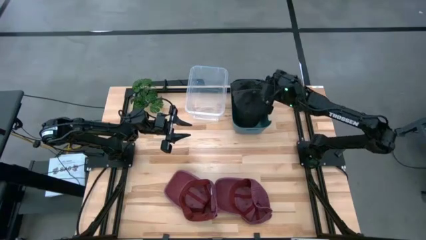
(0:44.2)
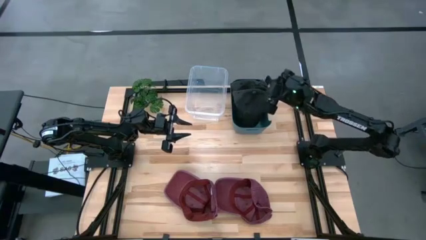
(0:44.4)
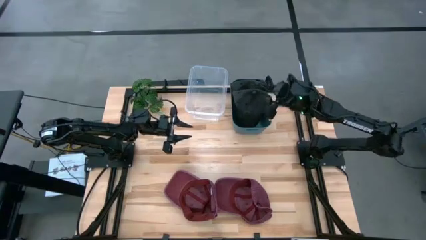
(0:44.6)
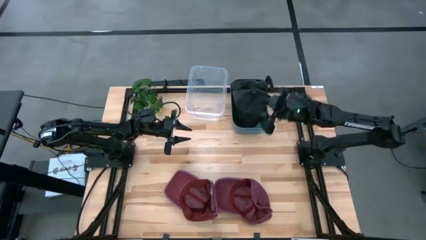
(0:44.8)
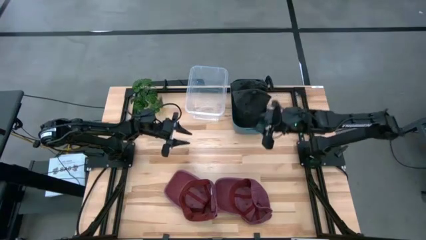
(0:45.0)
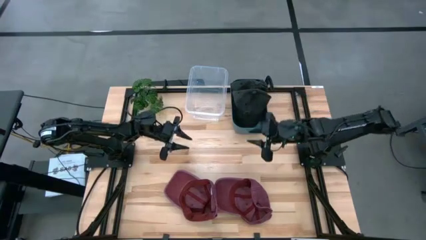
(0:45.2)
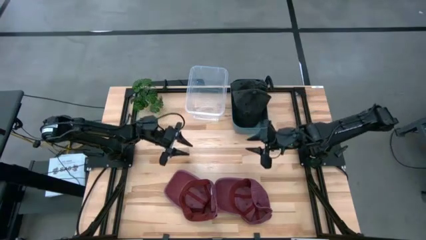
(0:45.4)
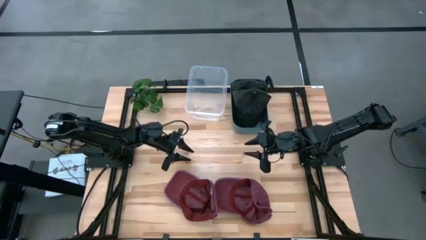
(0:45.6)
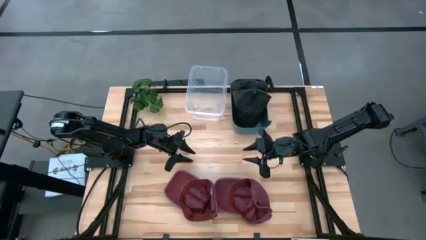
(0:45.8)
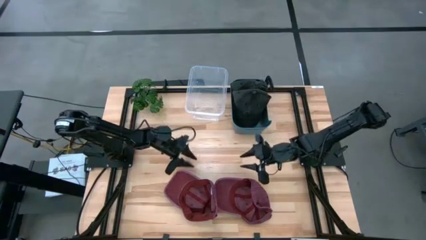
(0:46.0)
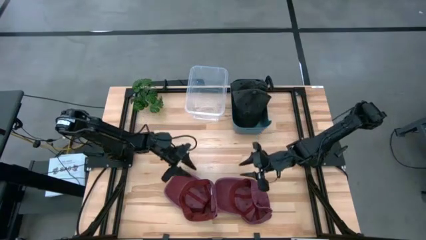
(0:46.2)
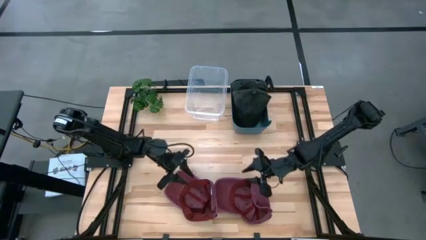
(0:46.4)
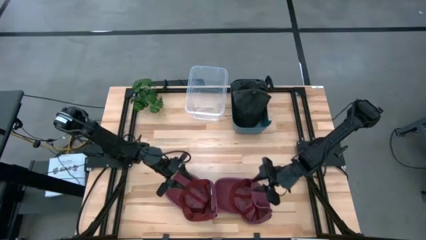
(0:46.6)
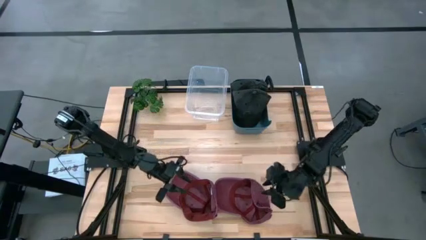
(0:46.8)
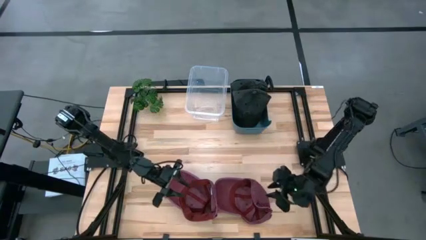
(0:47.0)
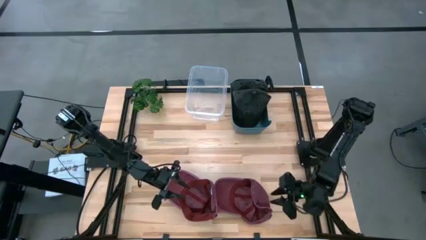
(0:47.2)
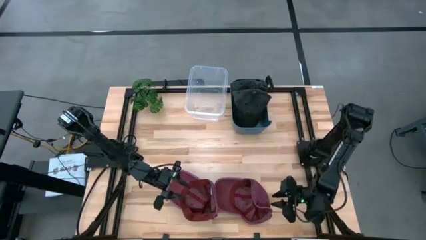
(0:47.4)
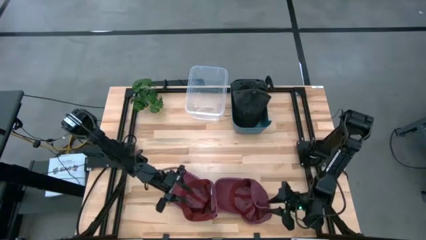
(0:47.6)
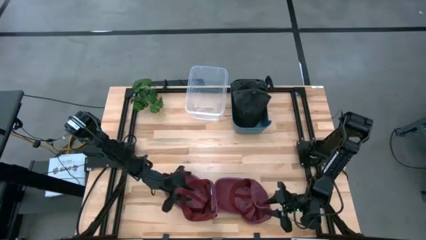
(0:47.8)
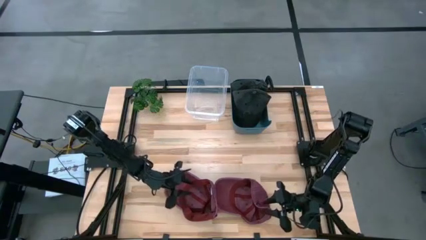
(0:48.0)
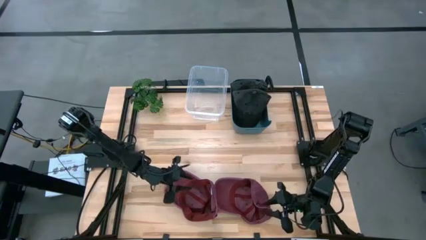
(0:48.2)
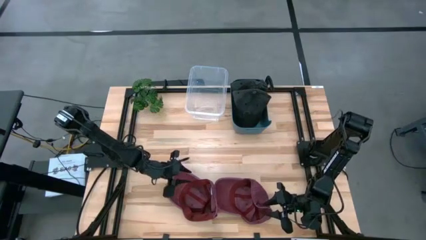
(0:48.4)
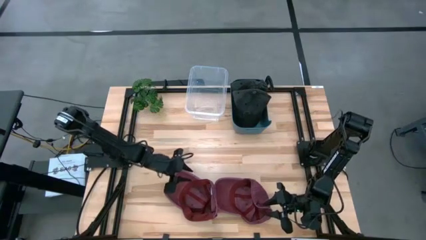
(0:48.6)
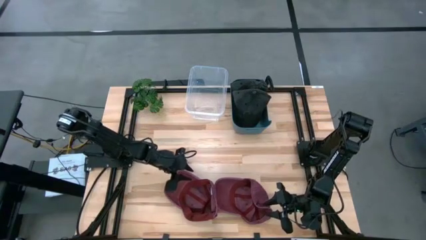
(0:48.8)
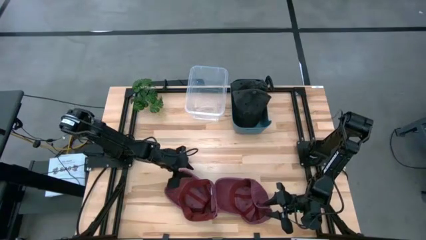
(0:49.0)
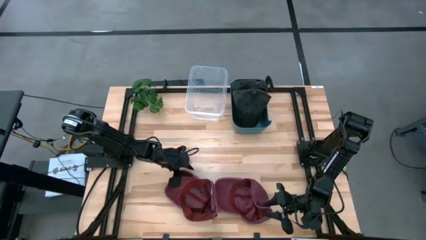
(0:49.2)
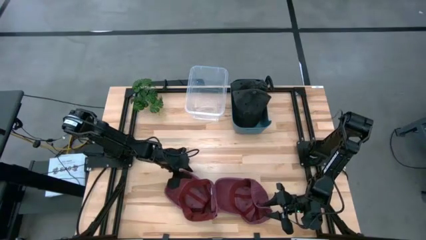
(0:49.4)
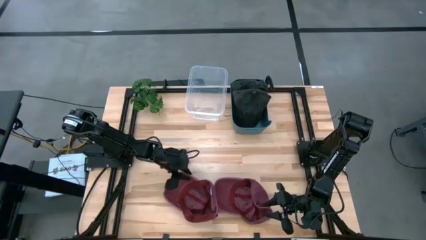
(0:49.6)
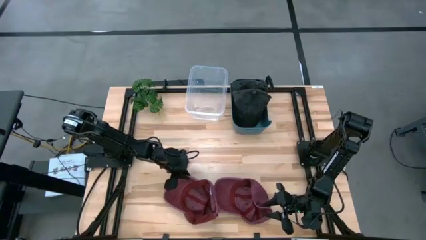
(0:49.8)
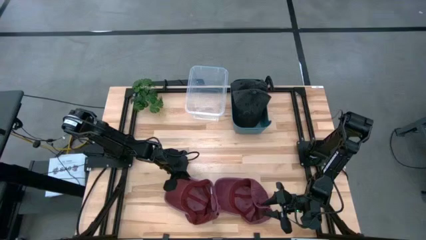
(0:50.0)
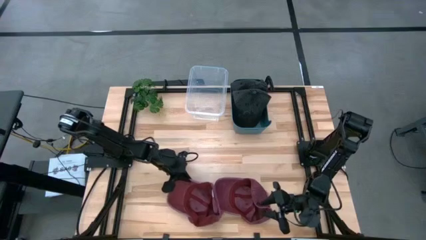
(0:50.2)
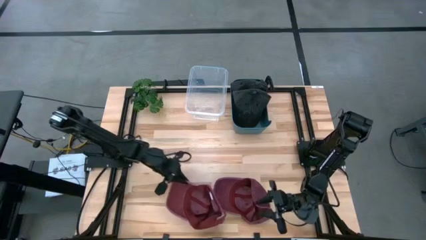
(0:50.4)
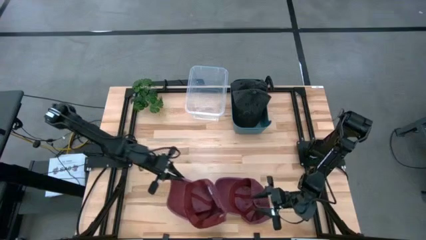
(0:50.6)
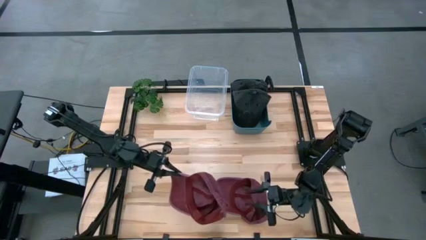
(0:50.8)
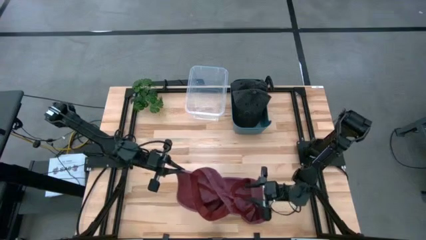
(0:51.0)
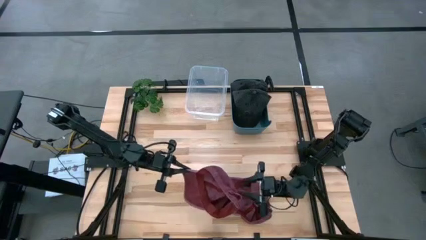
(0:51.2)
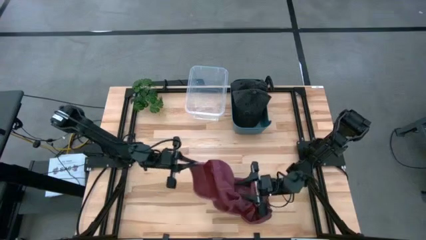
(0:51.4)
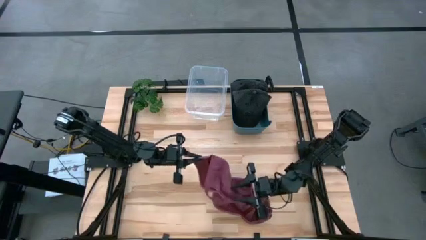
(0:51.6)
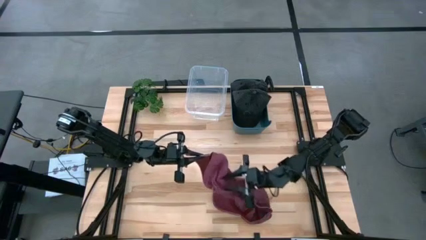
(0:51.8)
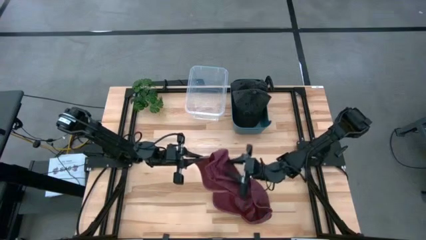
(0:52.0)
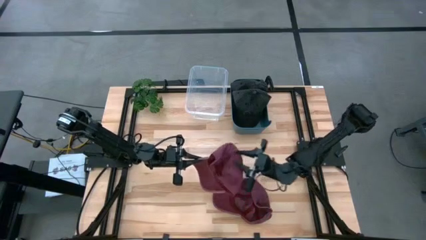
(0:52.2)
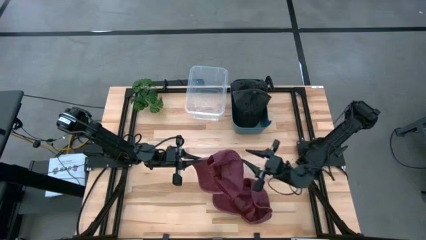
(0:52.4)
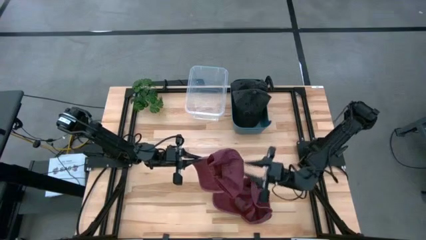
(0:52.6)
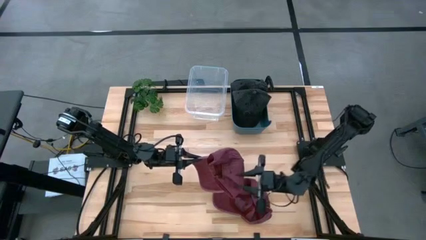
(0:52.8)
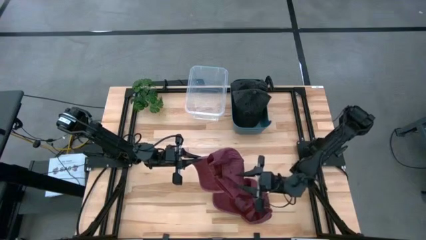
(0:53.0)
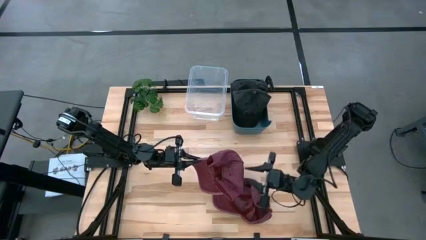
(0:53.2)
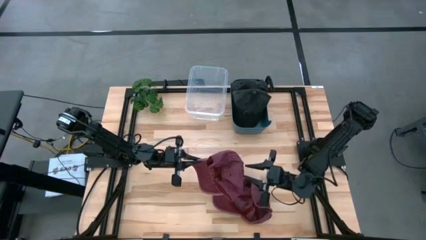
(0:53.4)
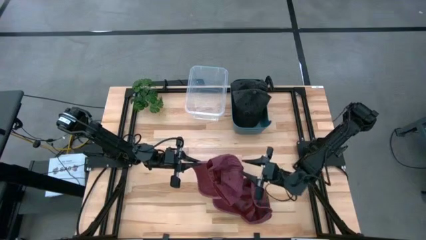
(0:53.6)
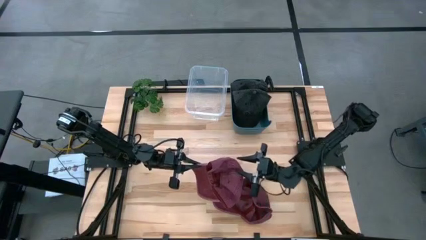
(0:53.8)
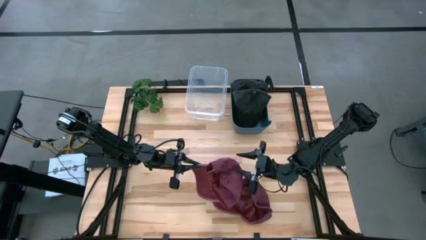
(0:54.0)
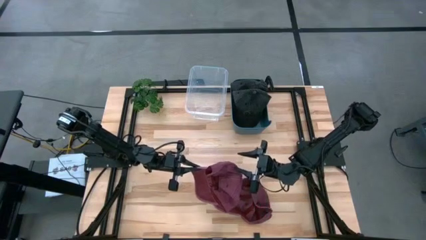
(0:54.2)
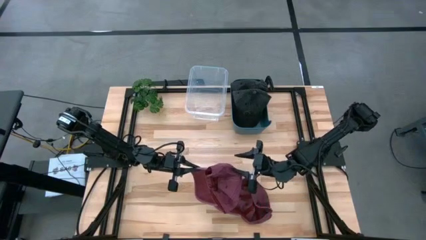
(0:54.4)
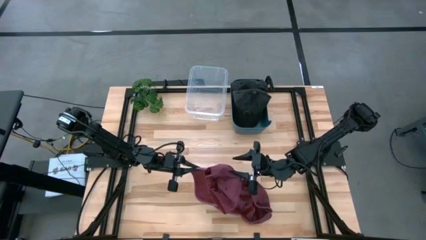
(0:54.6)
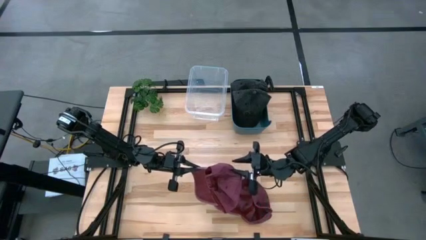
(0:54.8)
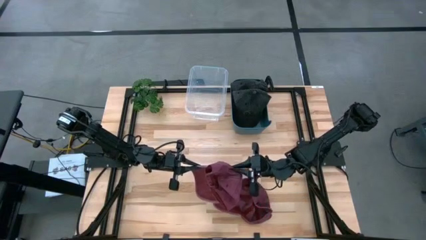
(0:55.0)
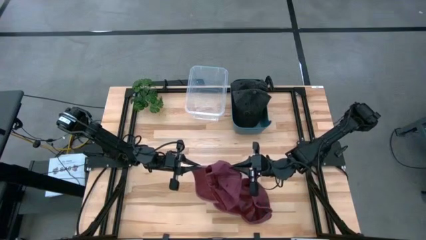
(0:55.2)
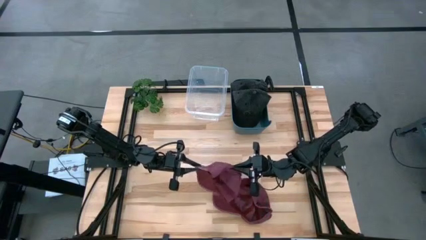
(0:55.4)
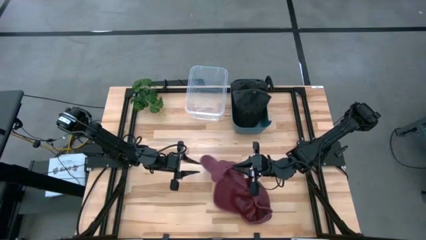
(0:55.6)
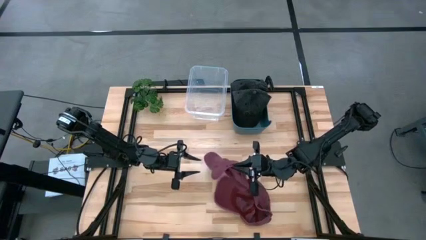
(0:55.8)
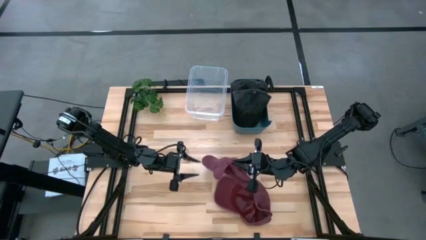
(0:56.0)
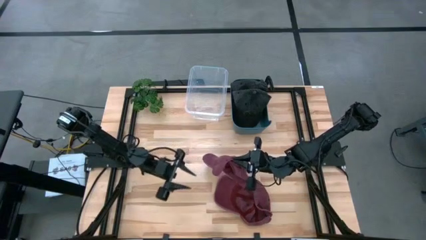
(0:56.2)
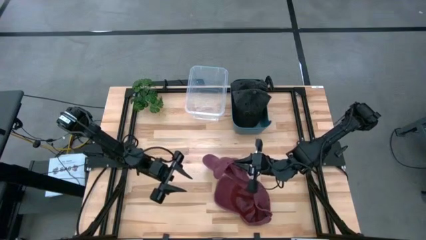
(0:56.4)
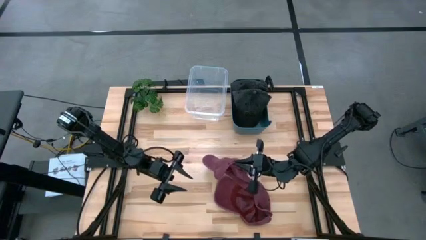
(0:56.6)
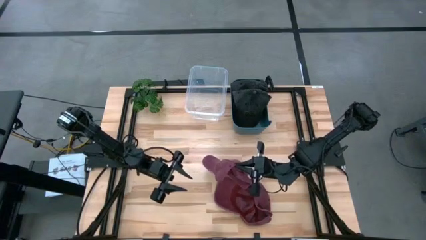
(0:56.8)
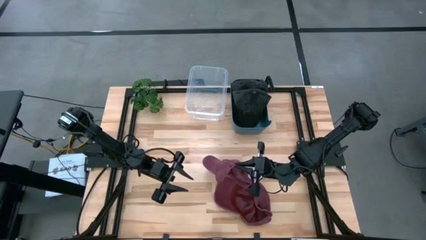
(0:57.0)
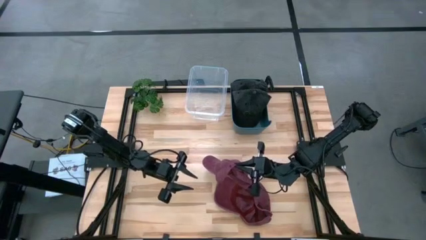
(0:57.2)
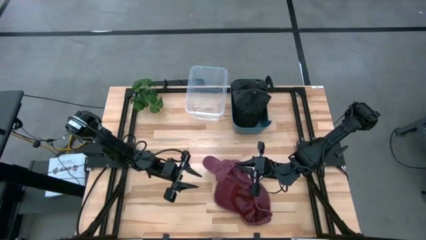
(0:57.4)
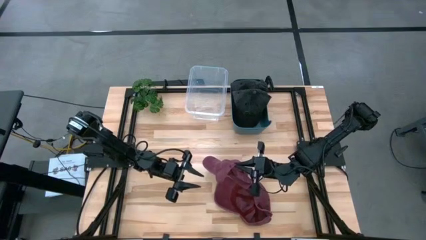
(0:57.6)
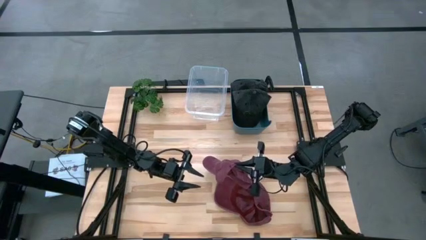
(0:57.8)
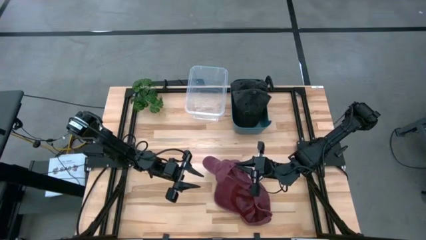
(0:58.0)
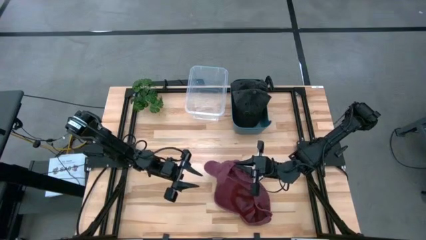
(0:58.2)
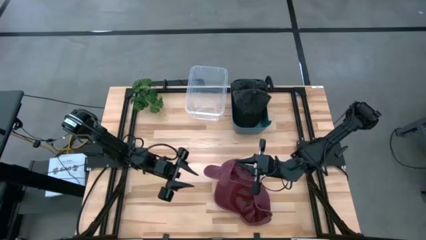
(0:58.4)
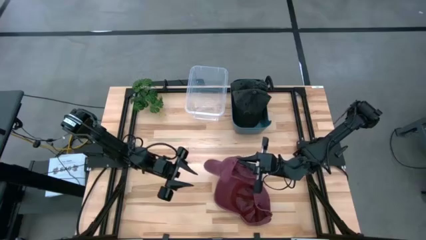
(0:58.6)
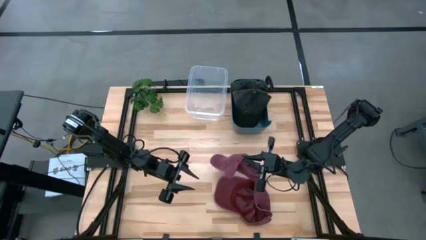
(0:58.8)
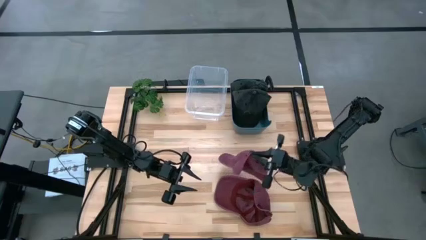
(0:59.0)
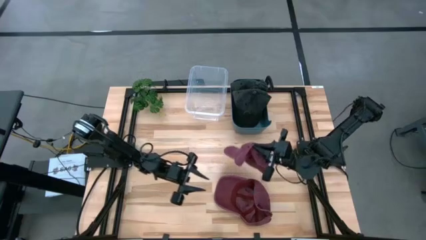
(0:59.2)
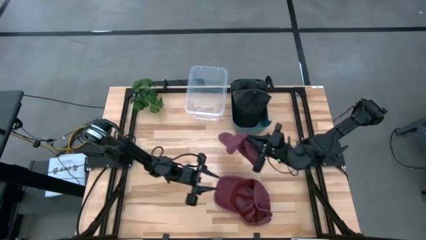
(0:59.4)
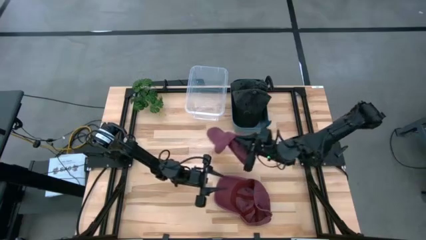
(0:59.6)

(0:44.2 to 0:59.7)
Task: Pick & Place hat
Put the left red cap into the transparent bin
